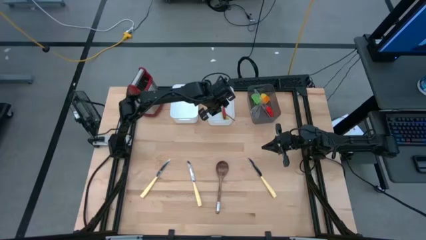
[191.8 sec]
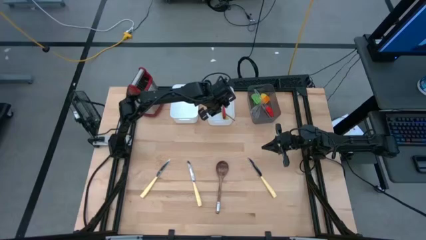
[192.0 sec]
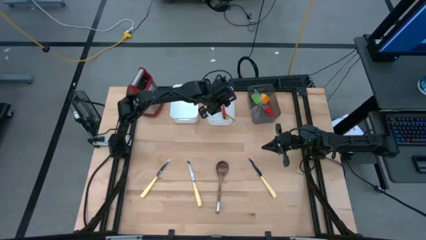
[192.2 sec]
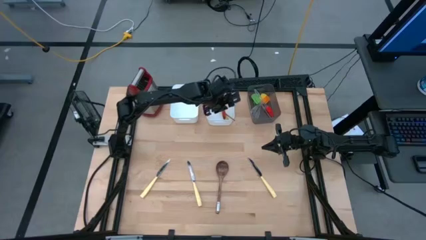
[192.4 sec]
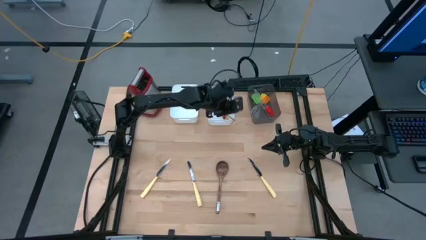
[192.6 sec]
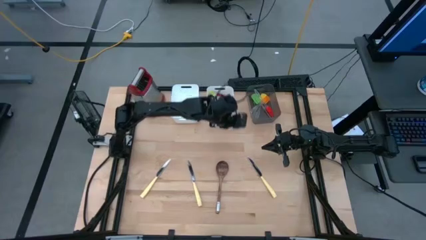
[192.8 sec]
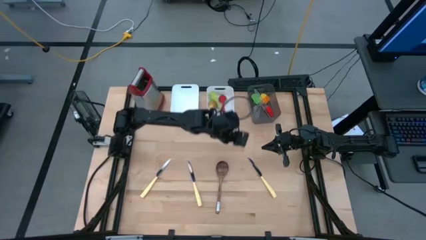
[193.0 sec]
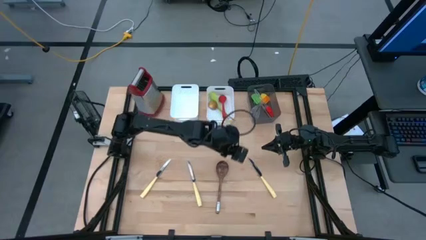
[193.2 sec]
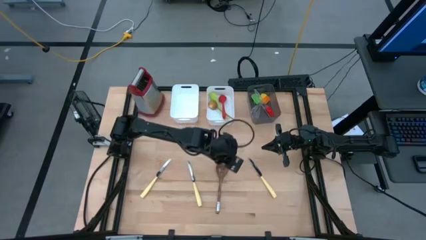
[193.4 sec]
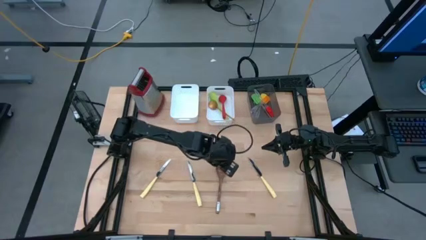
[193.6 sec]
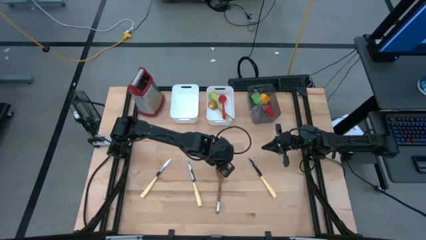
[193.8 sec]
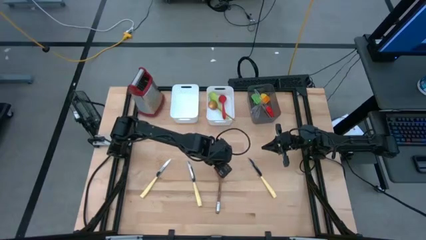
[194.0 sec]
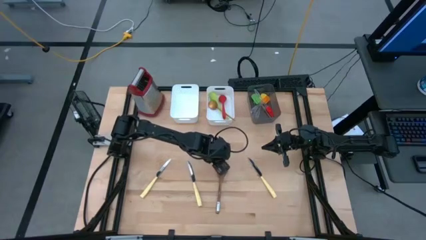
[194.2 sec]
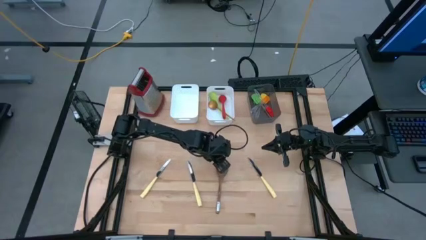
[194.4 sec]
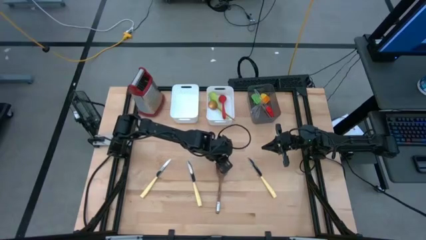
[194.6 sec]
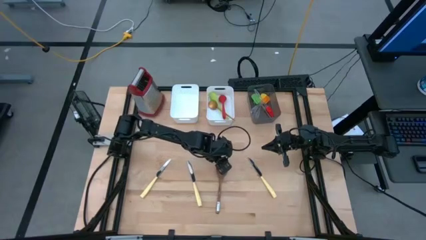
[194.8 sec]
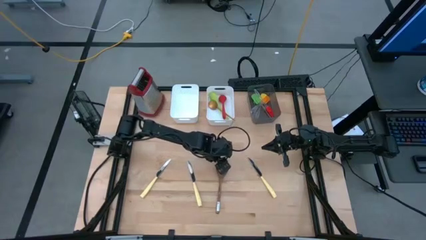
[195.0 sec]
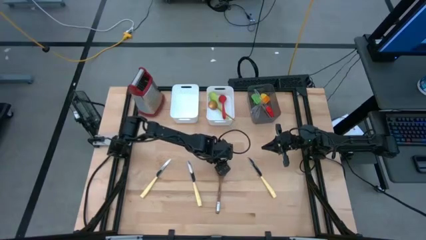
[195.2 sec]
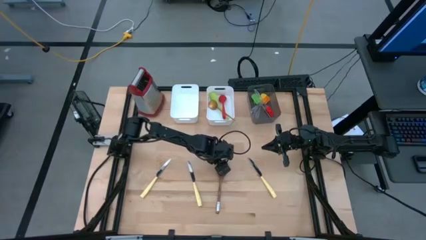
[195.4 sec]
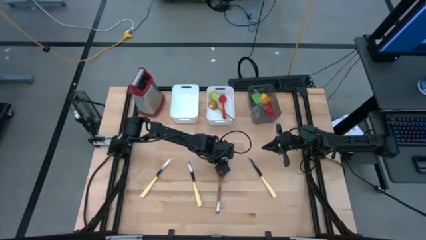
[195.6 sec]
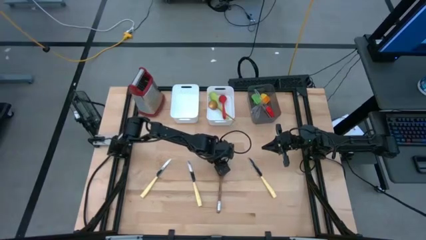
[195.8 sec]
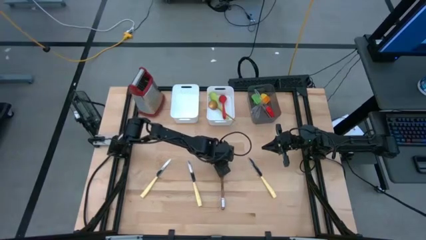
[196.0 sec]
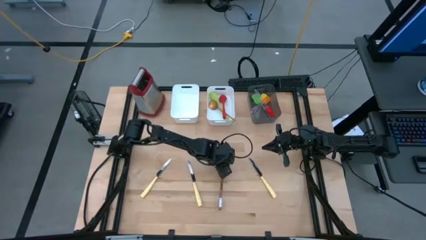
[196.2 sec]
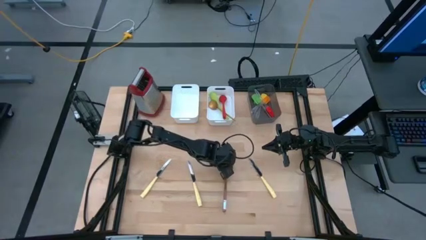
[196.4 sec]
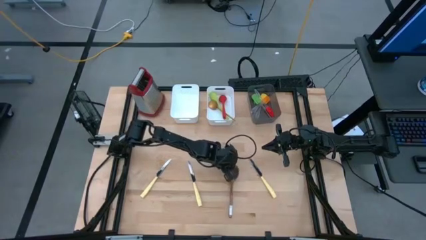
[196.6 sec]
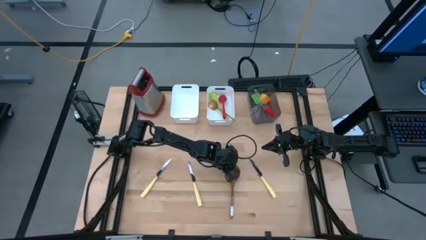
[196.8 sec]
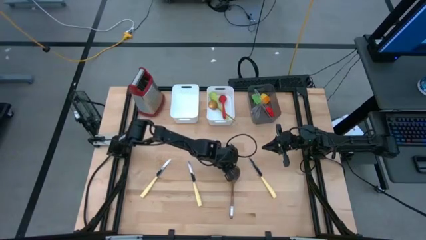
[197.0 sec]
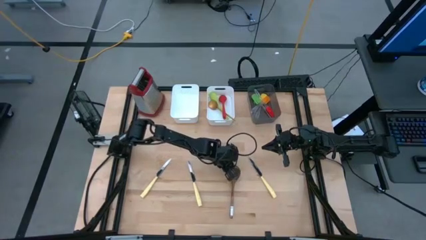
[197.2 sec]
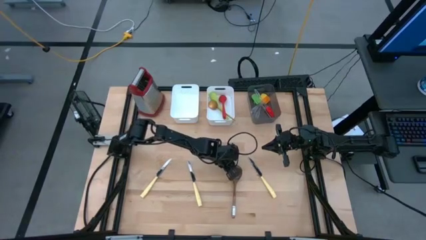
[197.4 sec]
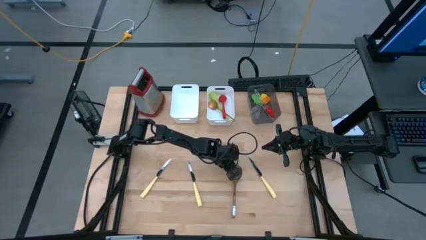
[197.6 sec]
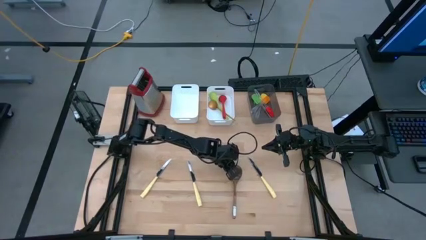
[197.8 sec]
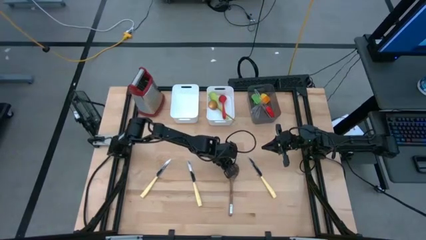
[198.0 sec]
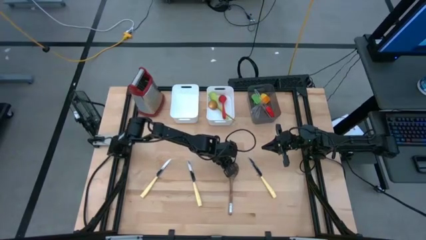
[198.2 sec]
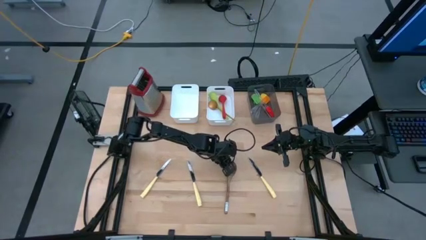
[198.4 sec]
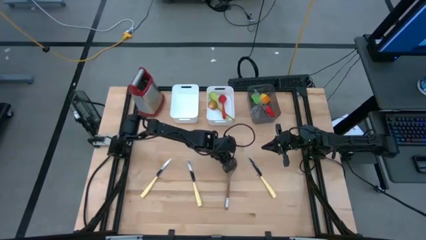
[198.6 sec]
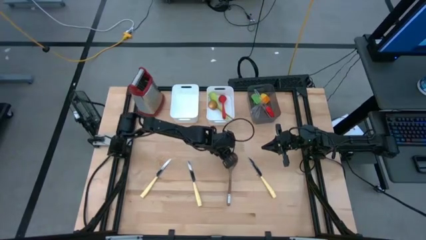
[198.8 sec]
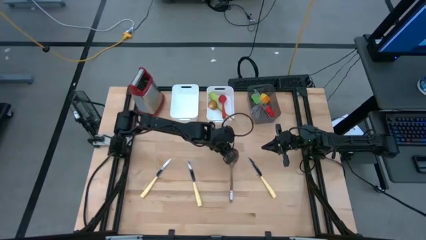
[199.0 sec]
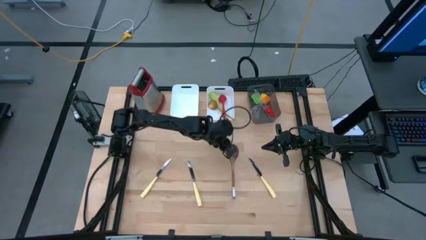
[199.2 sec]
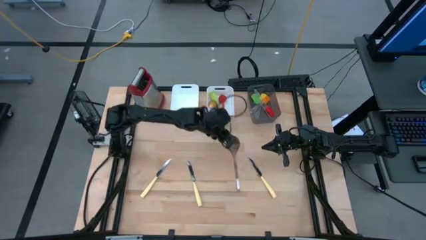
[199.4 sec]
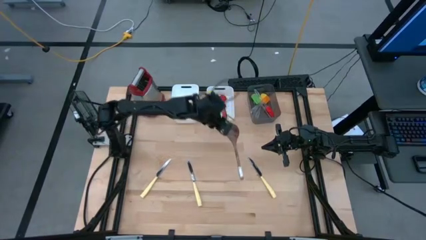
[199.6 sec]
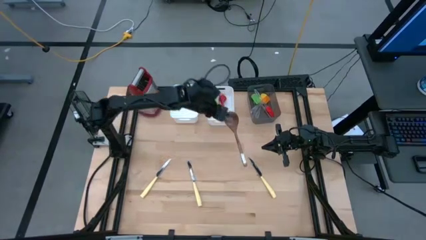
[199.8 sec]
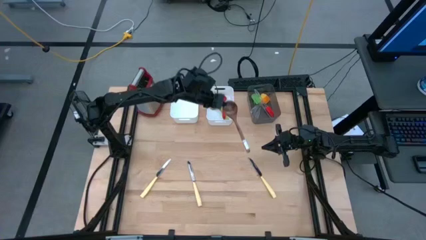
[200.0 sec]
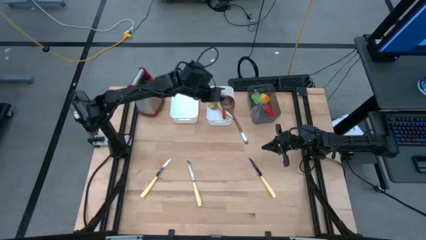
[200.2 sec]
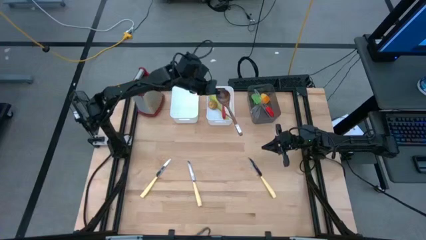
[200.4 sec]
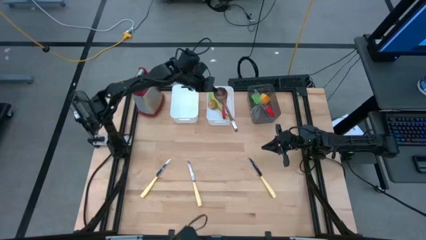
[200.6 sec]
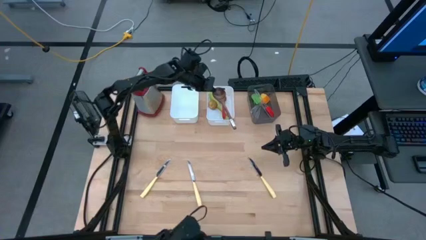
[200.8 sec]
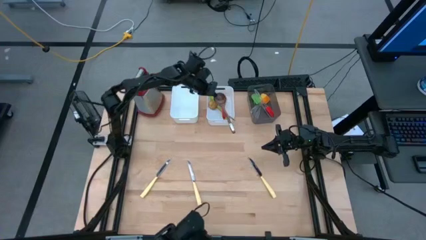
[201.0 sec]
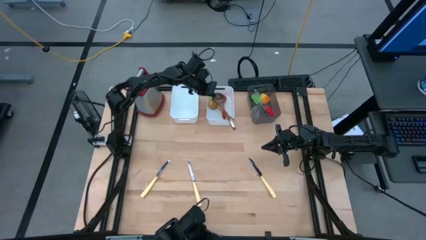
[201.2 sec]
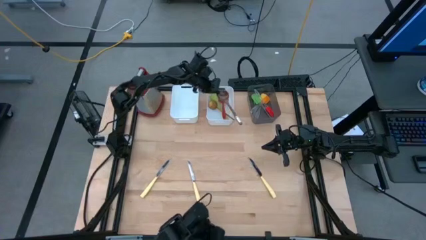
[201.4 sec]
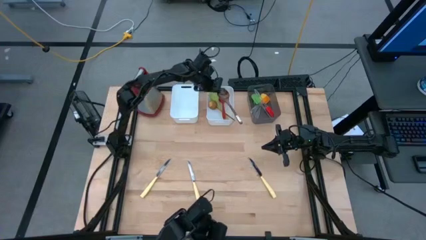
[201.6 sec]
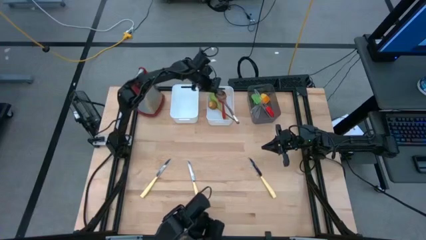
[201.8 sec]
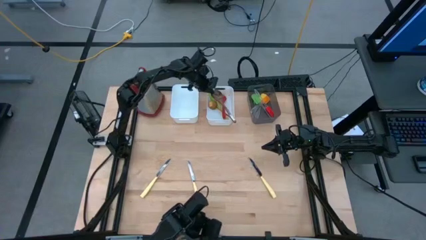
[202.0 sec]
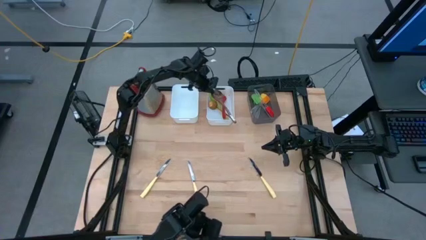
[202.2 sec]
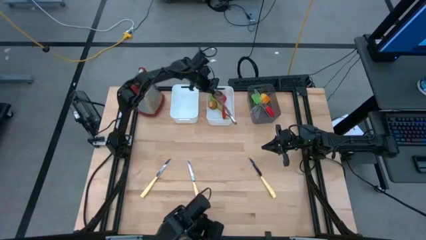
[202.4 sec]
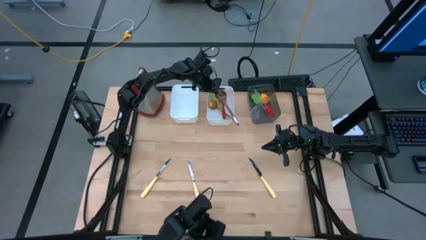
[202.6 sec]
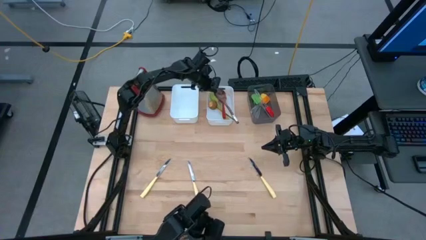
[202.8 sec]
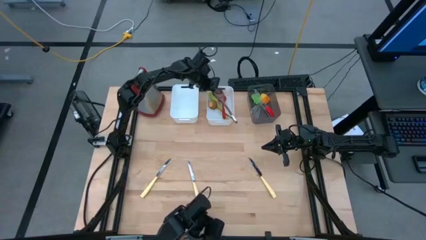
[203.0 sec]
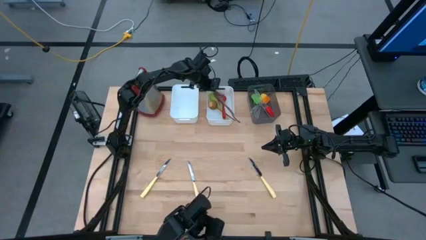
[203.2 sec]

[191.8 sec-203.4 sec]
Task: Pick & Place Kitchen Items
Put the brown serving spoon into the right white bin
